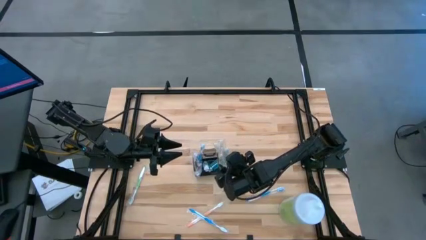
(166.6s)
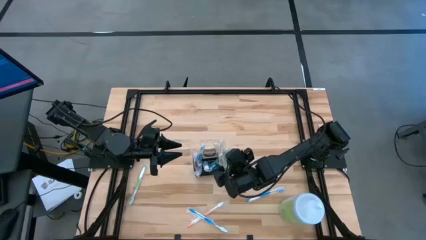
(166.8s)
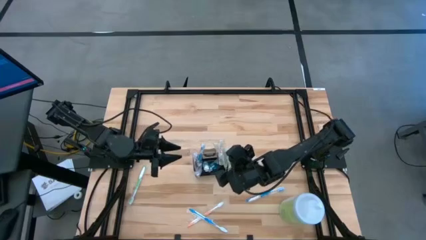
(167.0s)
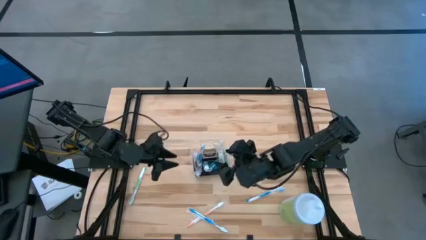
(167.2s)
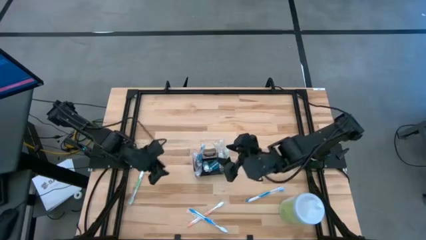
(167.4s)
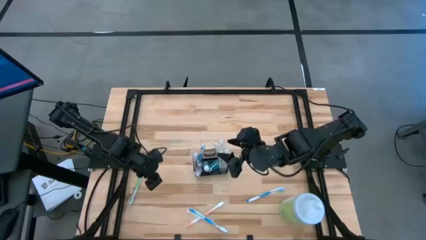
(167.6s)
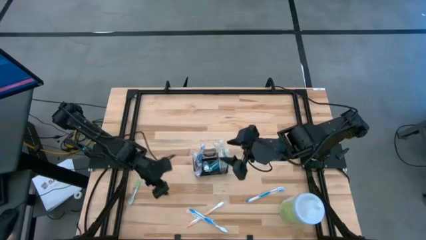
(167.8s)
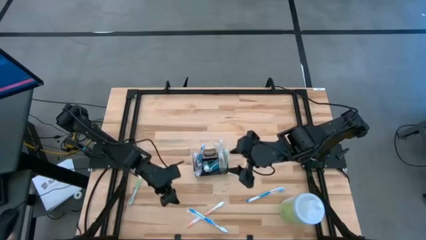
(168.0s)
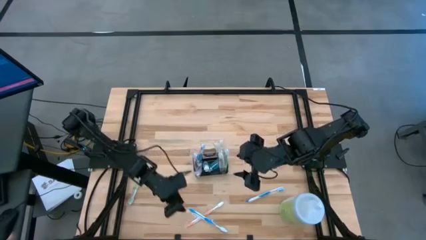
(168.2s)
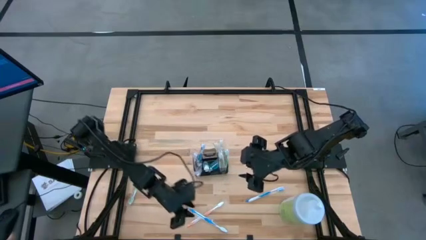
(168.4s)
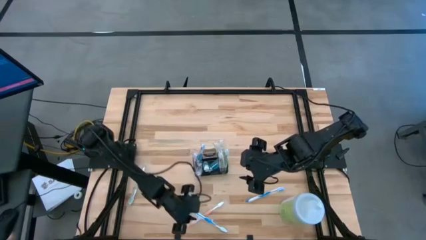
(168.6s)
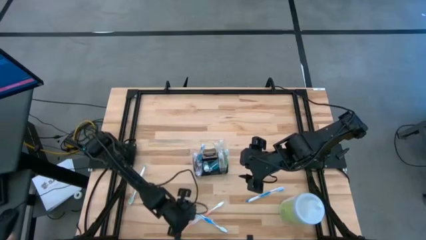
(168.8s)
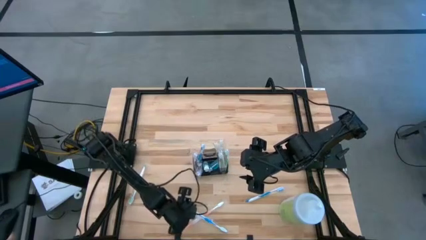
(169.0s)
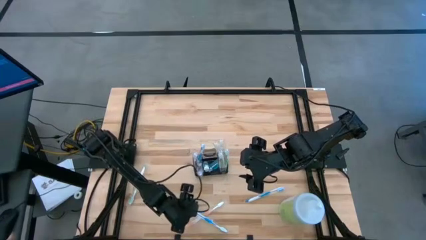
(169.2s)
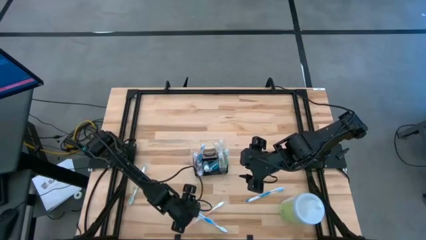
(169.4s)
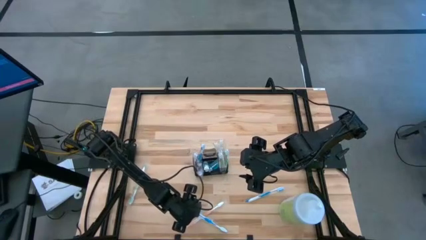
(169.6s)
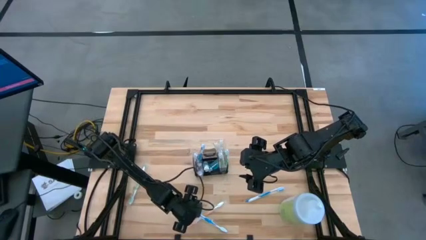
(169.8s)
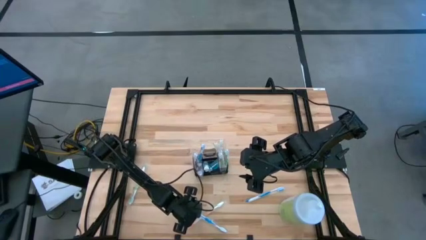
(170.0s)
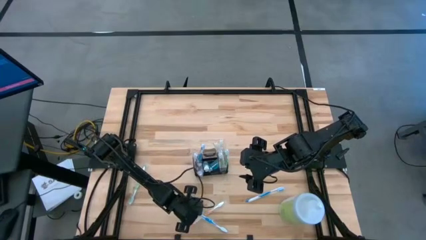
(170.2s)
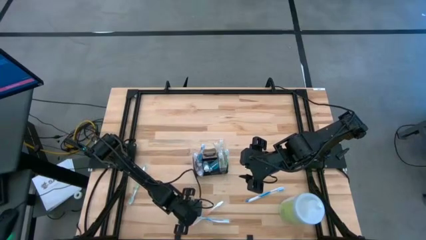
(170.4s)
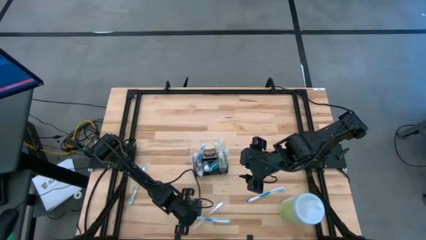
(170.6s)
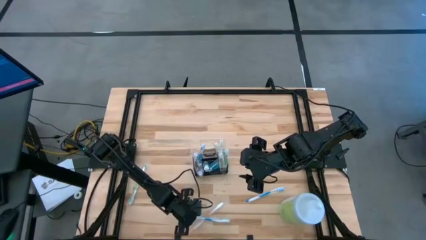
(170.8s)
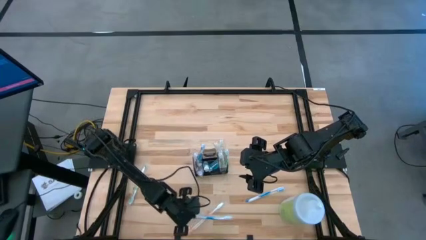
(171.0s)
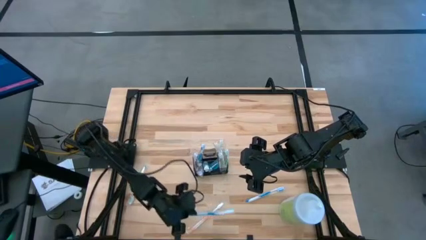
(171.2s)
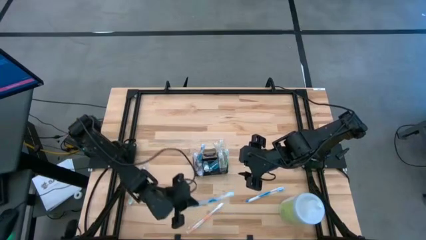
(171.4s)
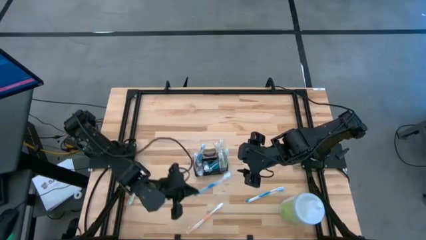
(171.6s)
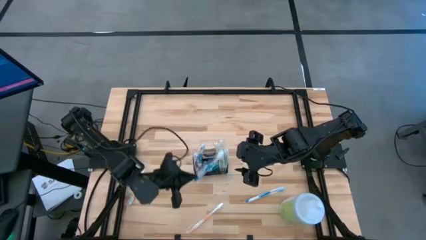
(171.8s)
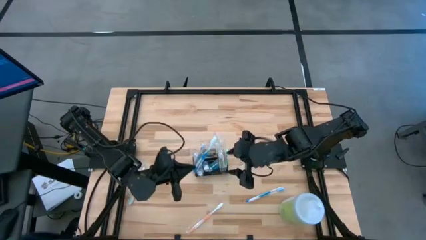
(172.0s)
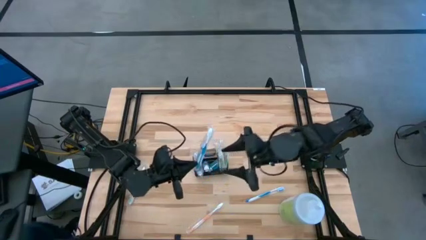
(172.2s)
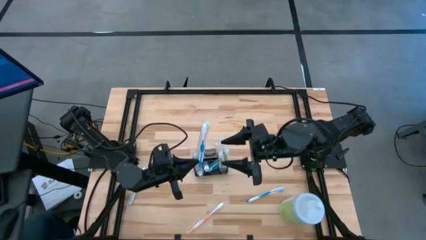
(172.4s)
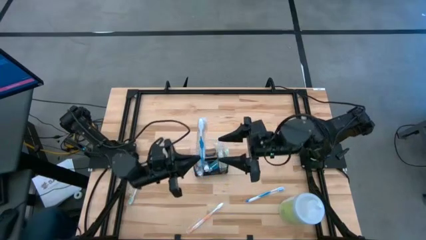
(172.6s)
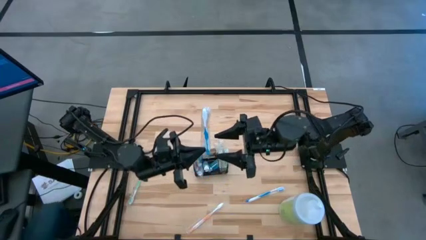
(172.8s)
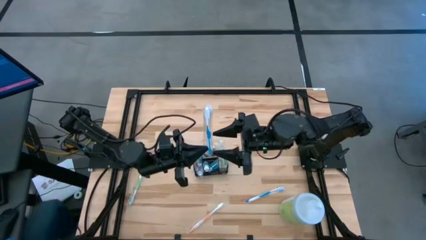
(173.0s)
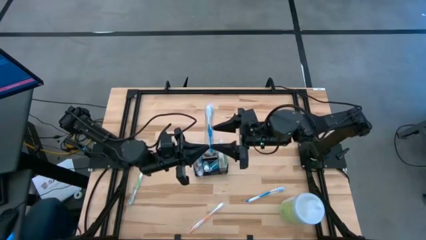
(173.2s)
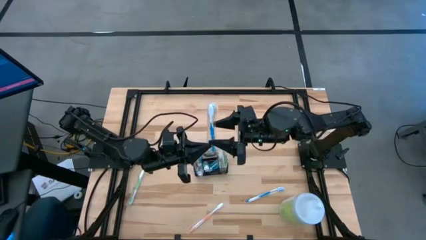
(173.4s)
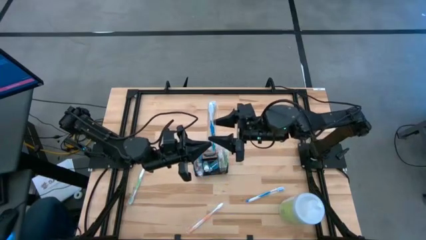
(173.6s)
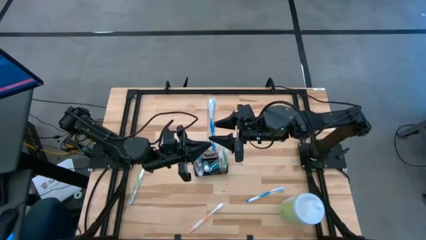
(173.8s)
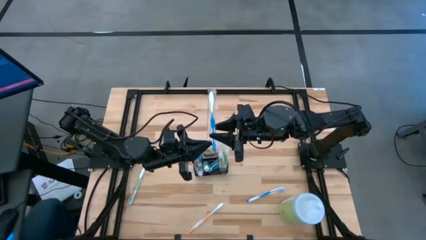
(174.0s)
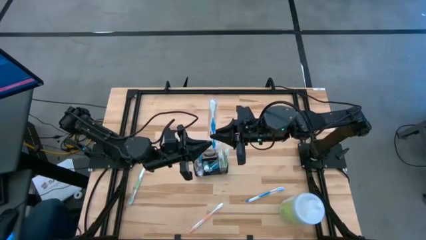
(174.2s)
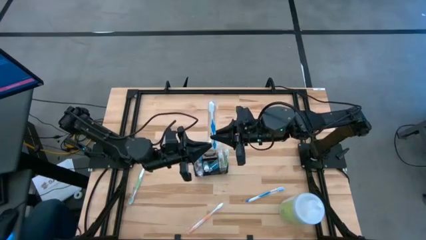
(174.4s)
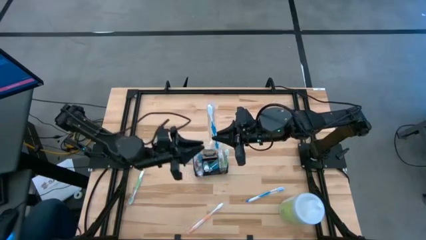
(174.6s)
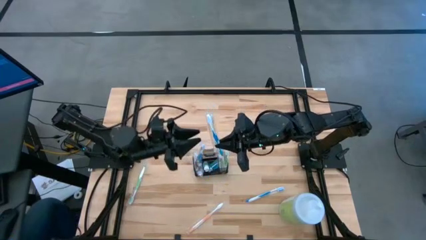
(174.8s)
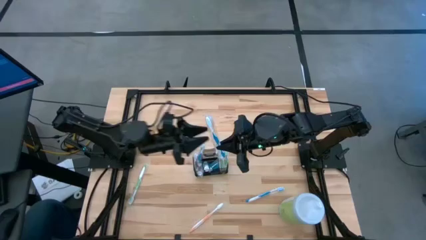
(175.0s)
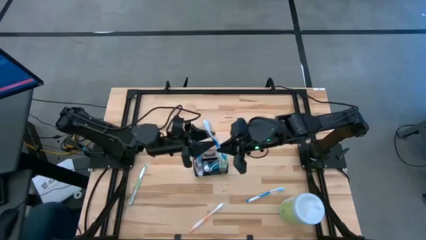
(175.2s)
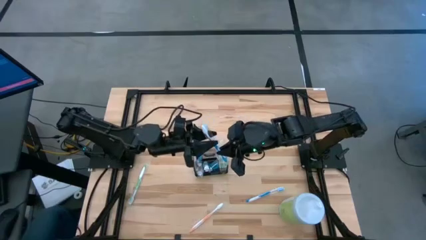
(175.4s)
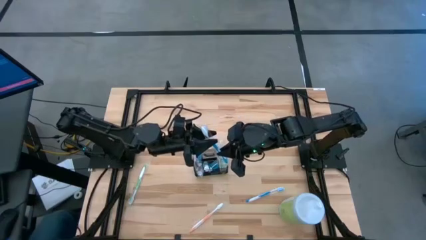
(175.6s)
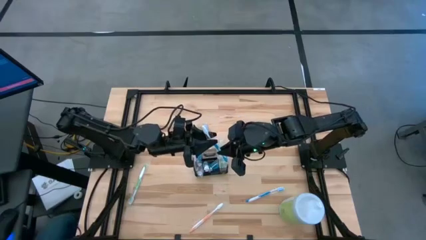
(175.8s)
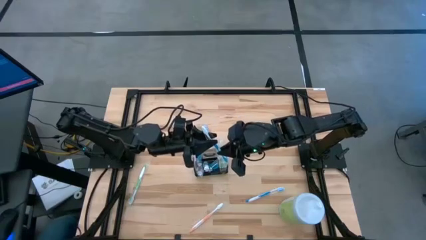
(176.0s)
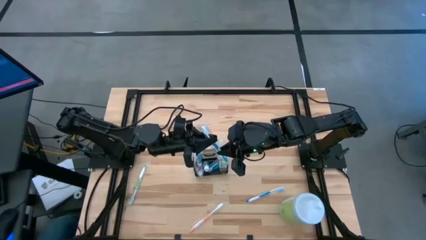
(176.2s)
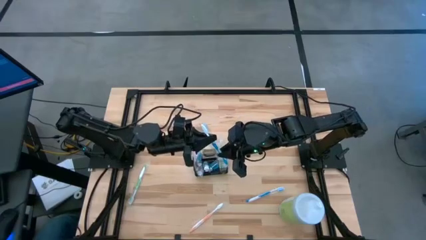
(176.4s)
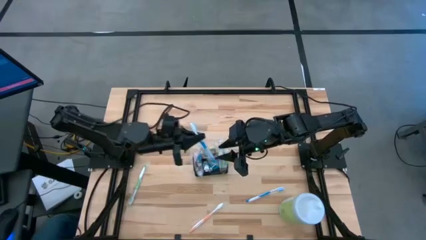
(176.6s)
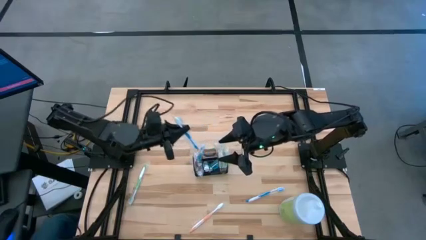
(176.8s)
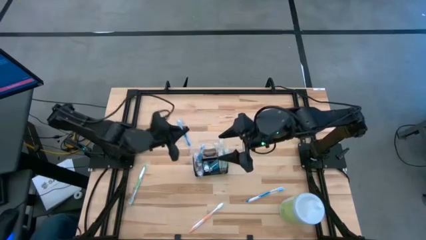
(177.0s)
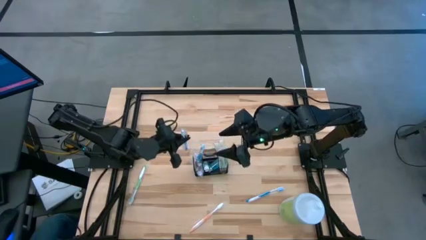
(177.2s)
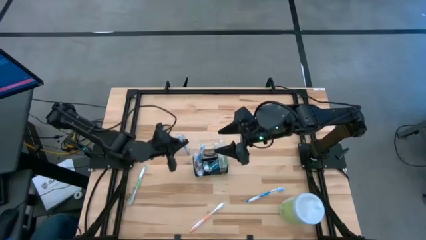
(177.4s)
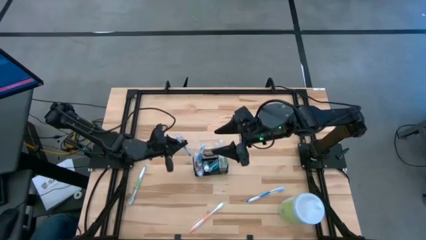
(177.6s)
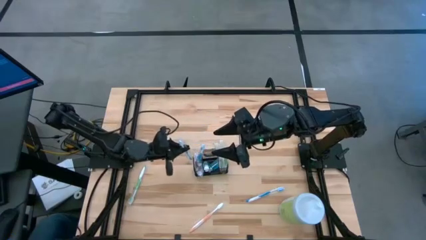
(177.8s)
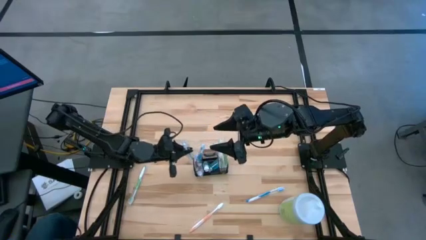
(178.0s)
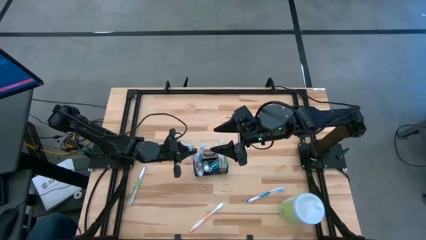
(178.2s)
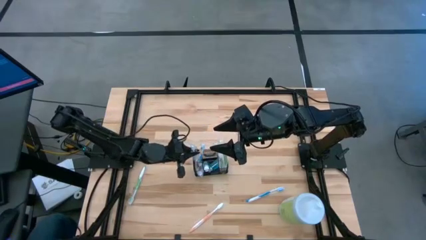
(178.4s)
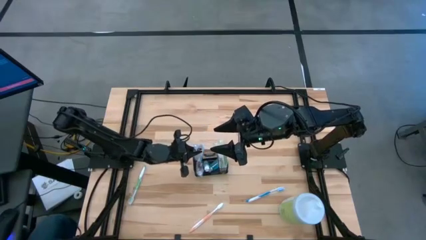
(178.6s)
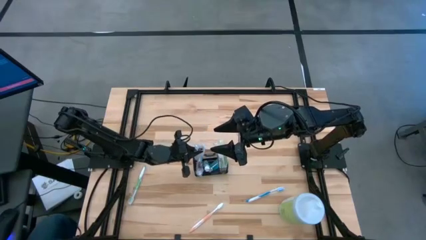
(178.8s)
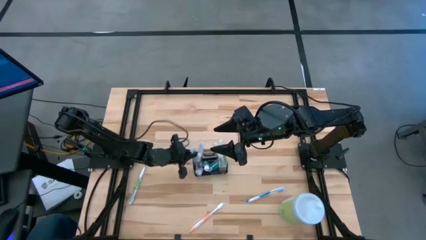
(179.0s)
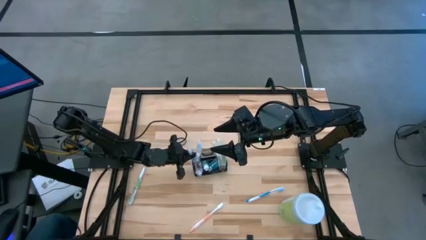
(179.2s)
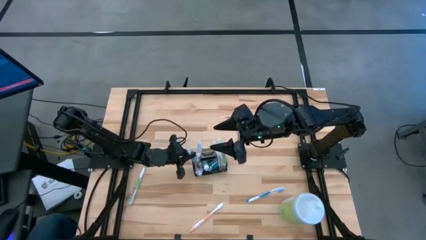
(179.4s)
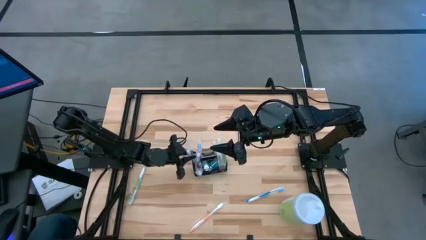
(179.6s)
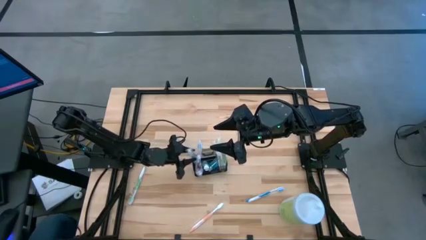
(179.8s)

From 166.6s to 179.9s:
Task: Pick & Place toothbrushing station
Put the left blue toothbrush into the top left section of the mesh organizer

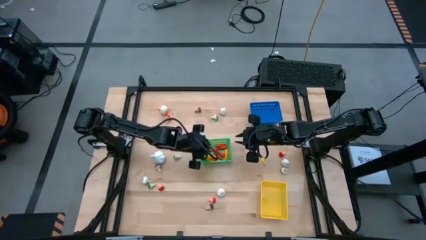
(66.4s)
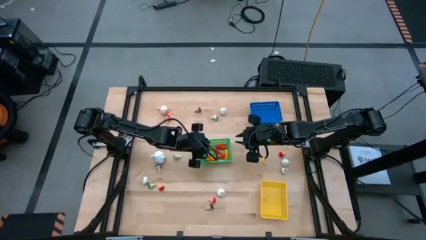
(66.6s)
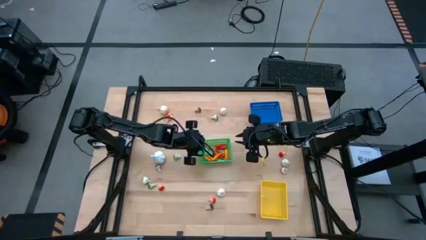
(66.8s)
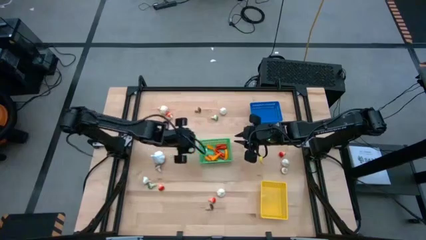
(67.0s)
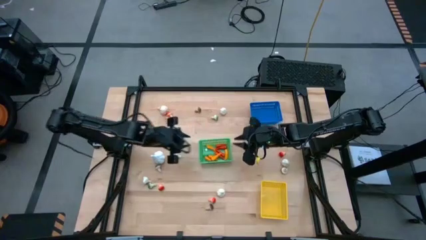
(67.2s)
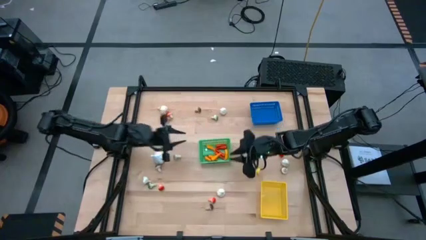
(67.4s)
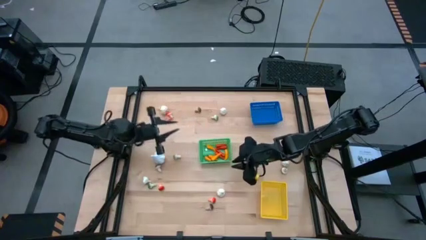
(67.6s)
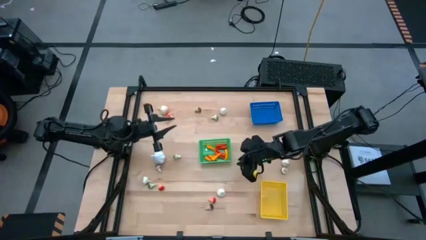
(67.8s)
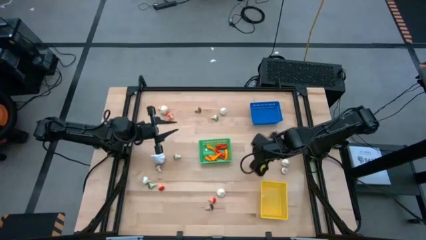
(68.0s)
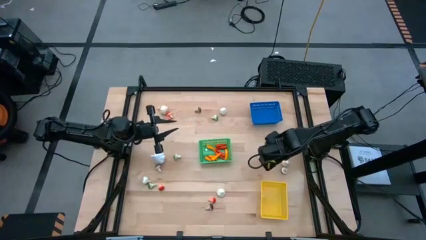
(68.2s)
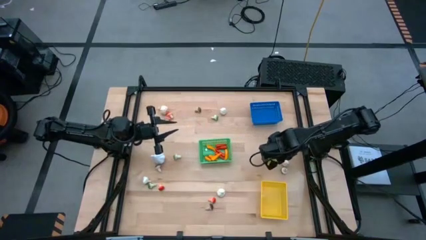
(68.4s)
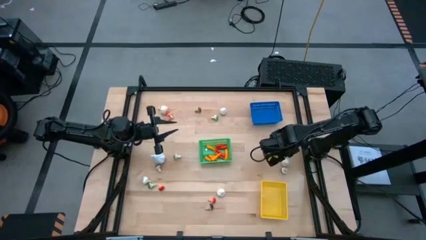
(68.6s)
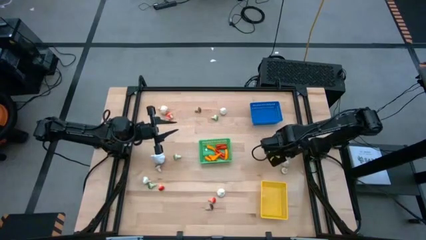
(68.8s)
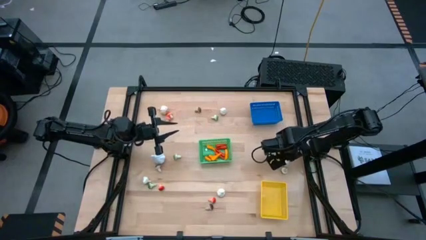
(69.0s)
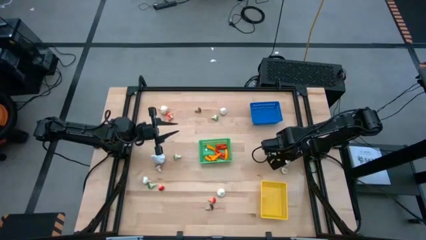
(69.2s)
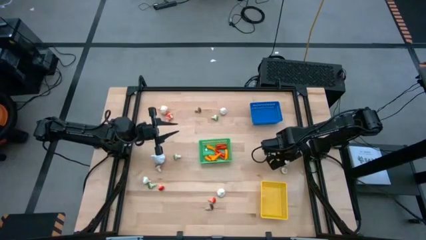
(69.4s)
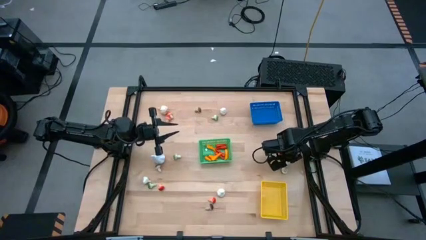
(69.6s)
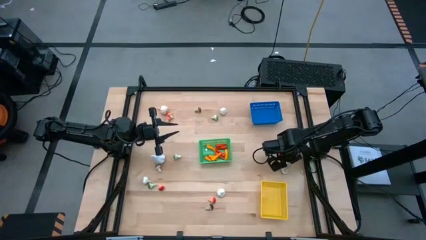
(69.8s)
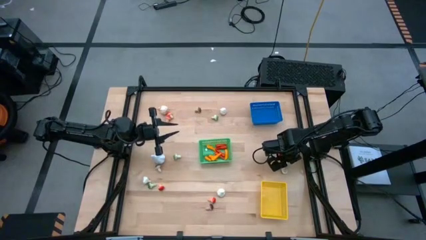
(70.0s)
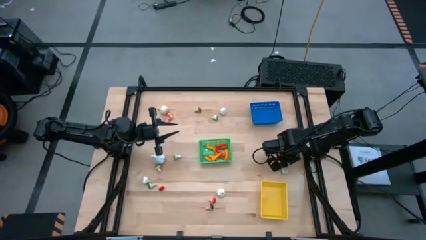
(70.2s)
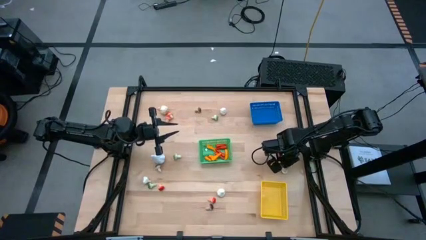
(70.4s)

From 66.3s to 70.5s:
Task: Sort produce into baskets
Put the garlic into the blue bin
